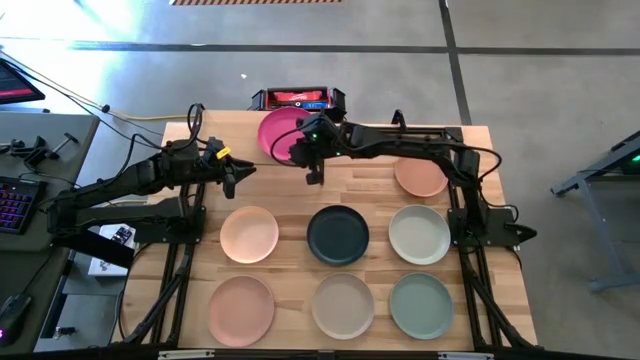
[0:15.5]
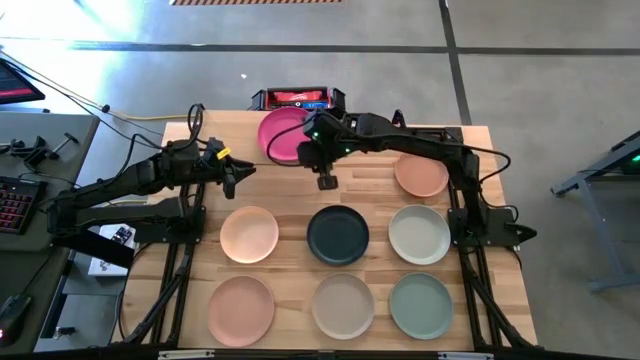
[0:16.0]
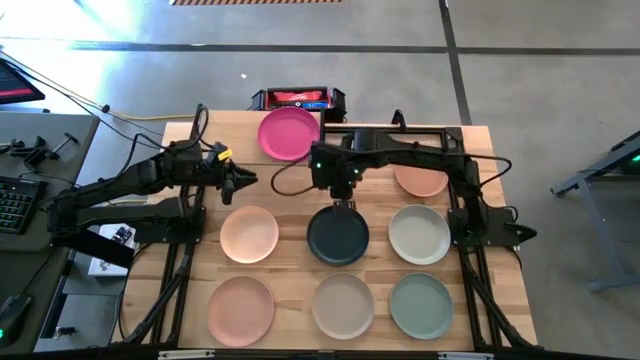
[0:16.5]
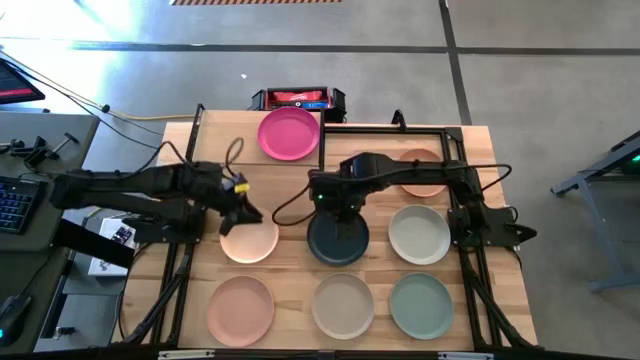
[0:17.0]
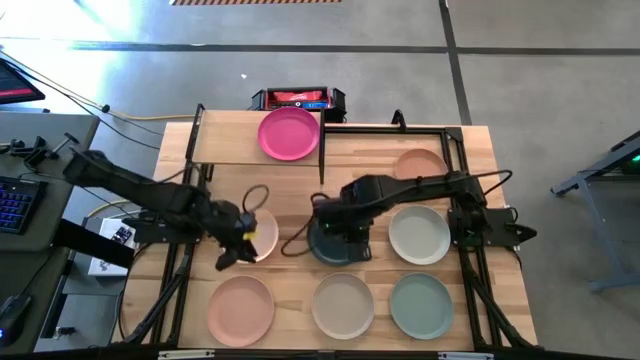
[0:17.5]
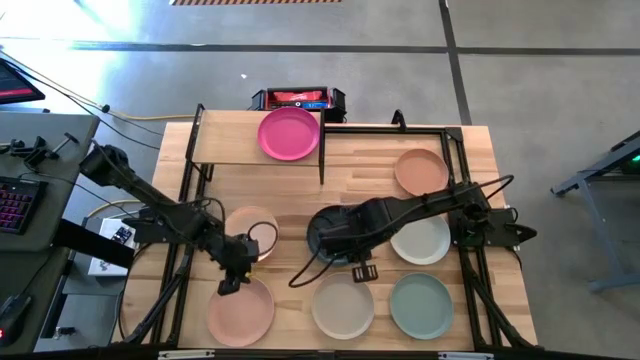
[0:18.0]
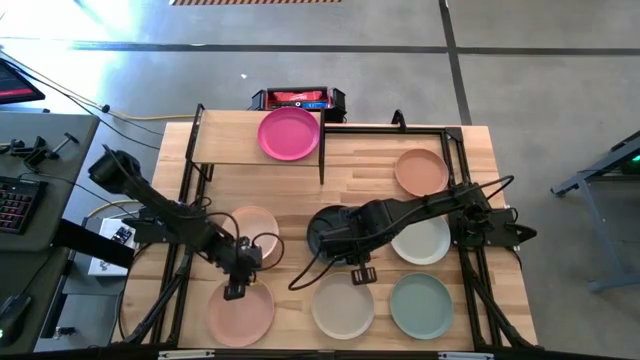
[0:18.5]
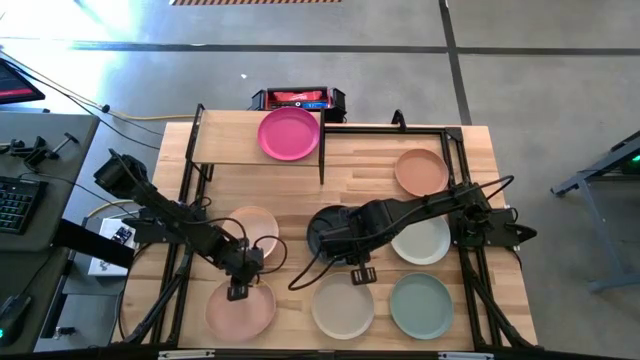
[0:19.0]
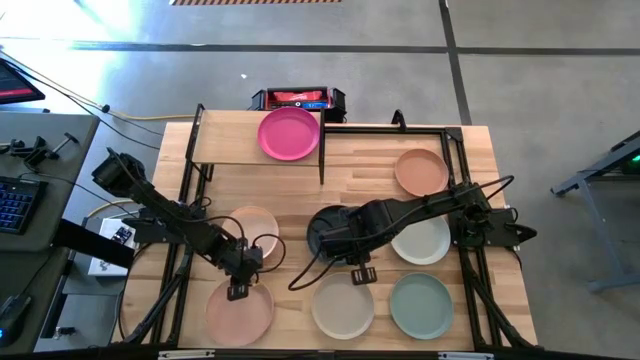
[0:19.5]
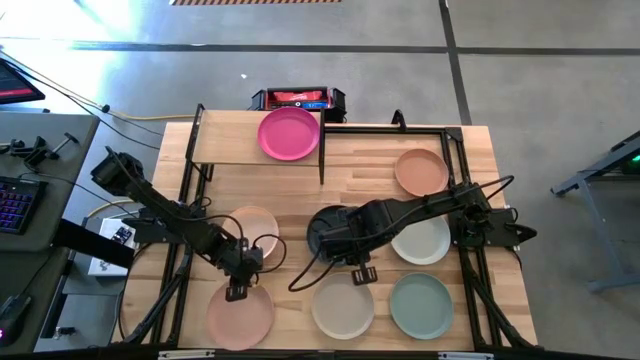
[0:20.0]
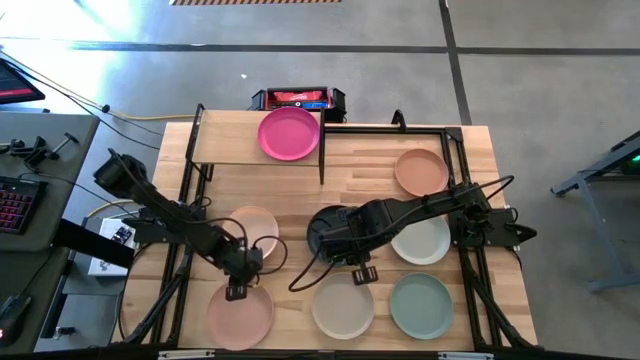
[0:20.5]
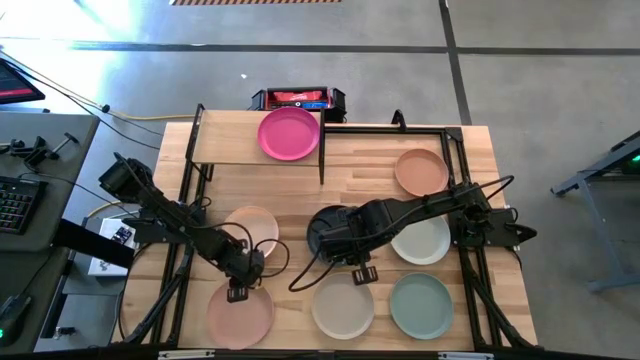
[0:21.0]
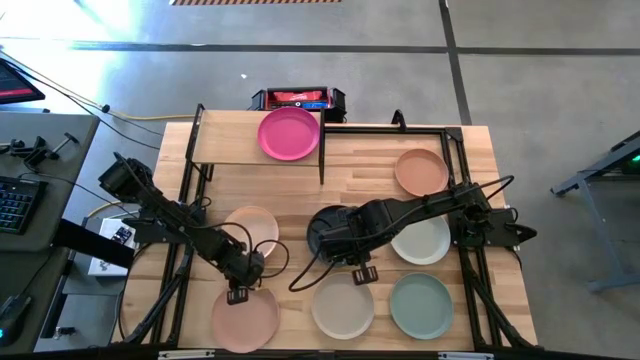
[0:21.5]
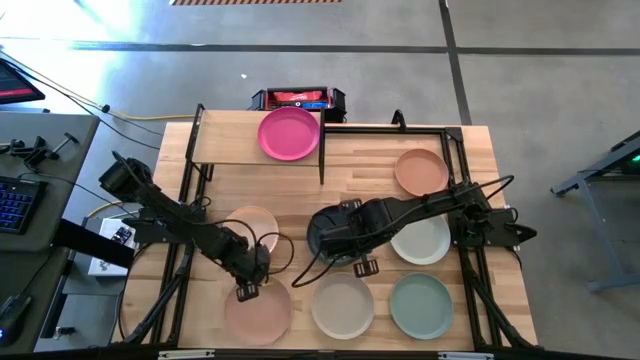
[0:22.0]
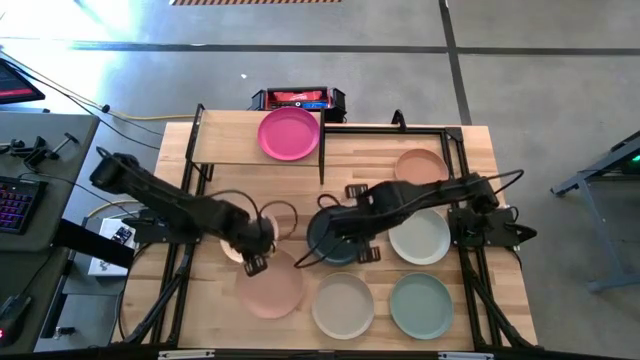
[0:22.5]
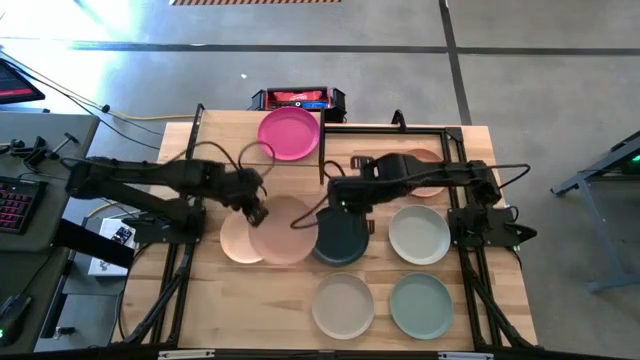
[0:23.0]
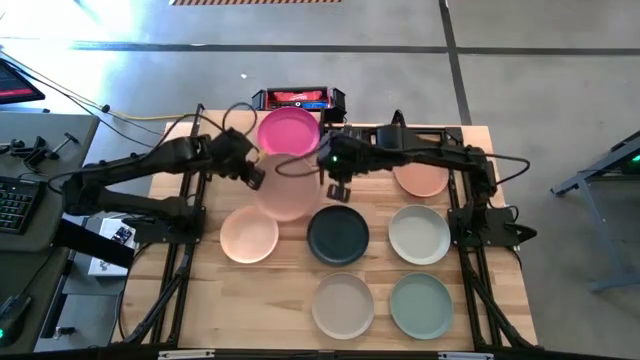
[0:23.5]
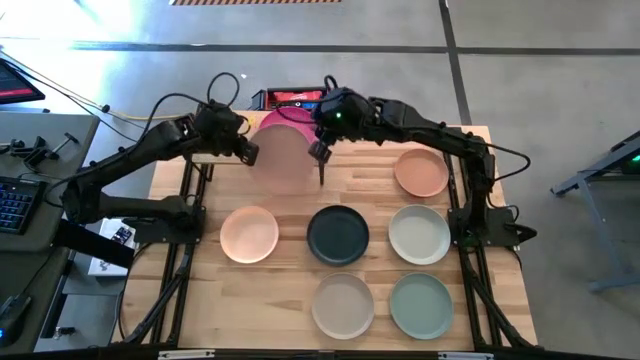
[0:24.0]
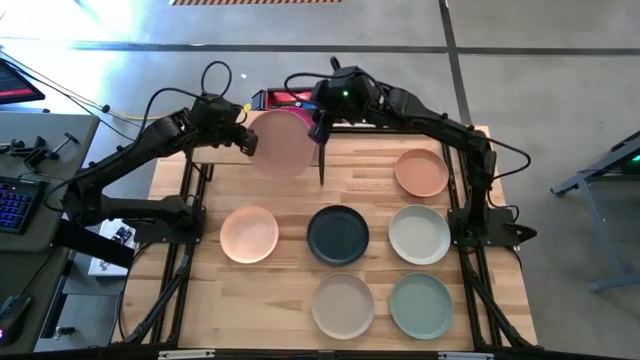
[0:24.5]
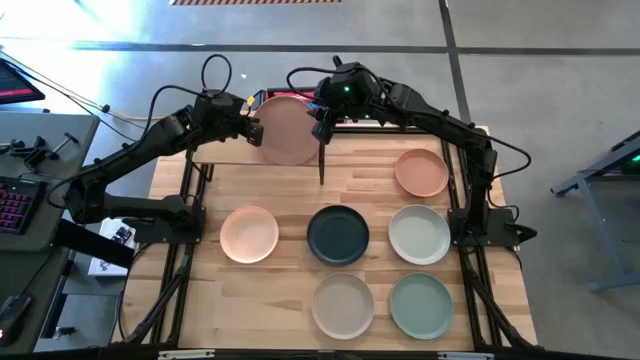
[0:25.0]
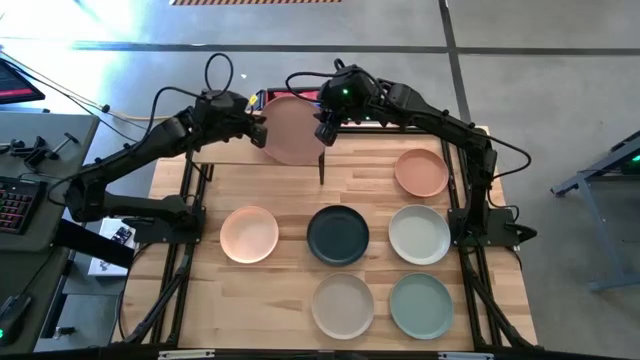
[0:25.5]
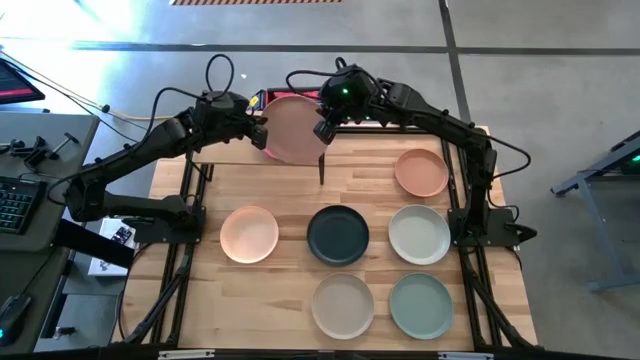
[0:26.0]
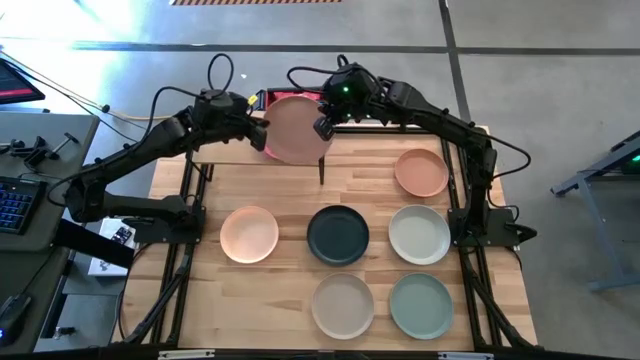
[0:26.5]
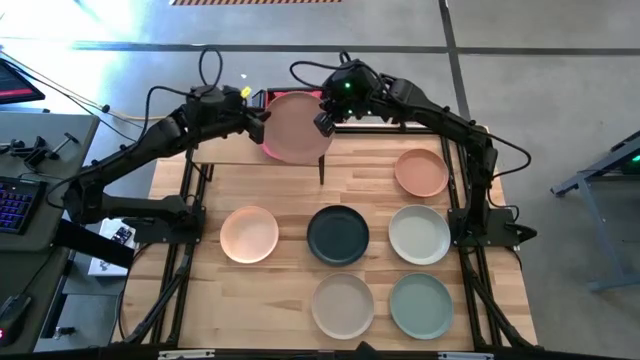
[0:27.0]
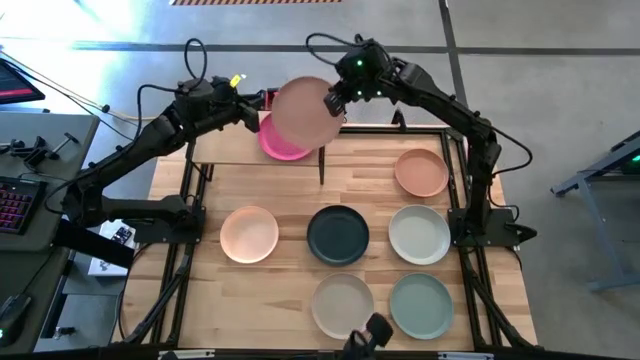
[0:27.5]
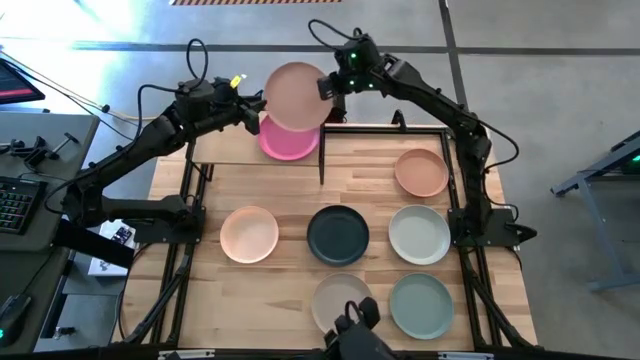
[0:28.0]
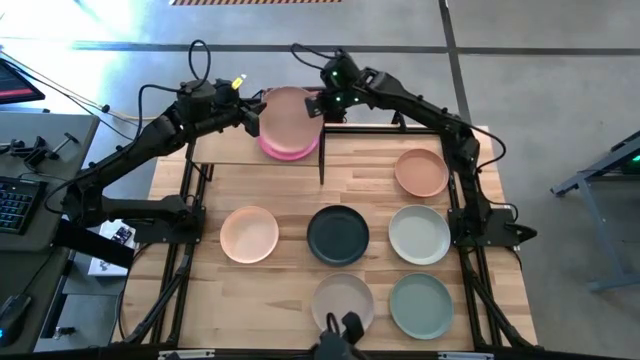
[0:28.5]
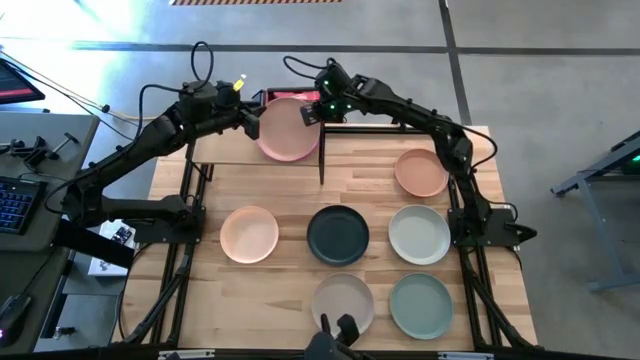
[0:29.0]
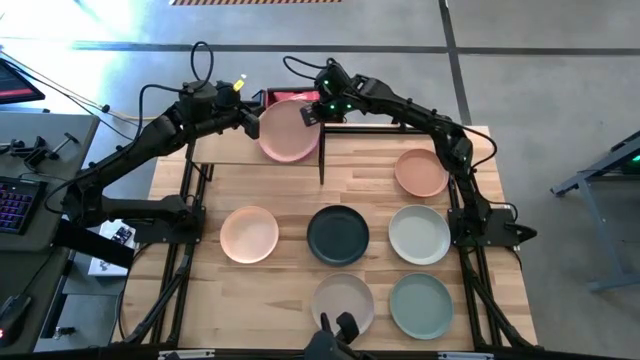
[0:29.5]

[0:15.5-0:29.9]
Task: Place and stack plates onto a shelf
Stack the brown plate on top of the pink plate on the shelf

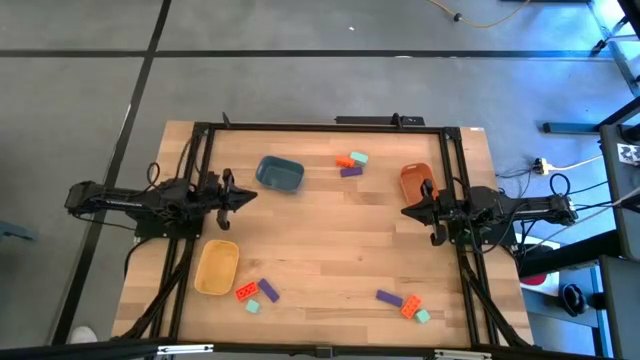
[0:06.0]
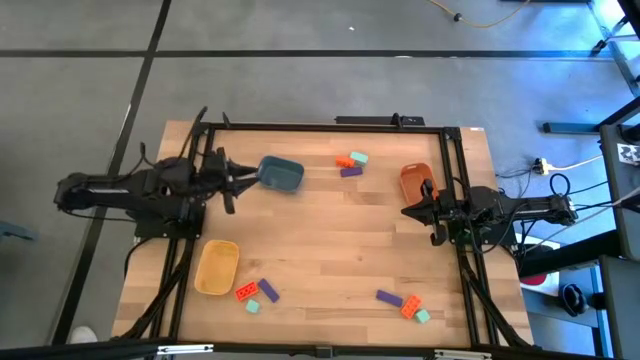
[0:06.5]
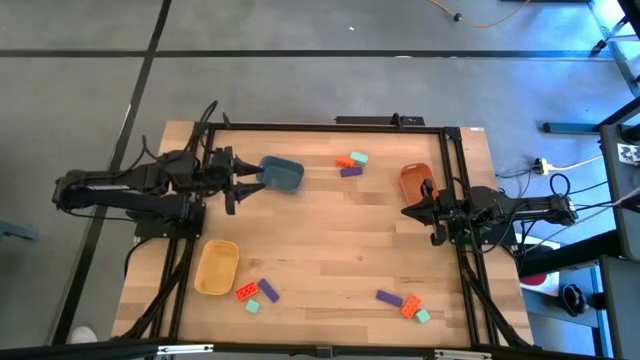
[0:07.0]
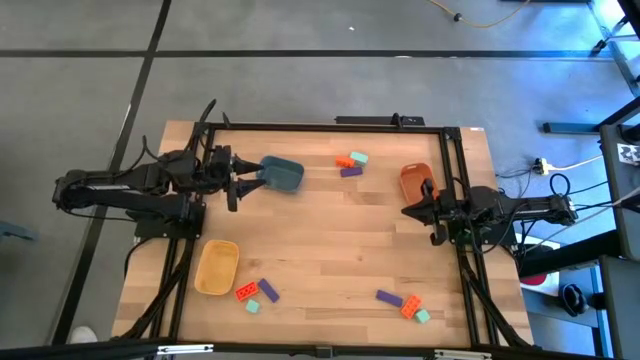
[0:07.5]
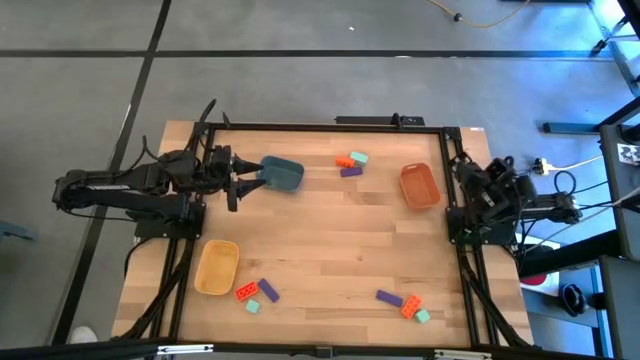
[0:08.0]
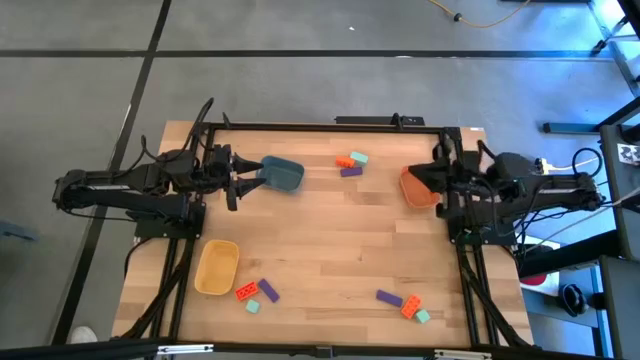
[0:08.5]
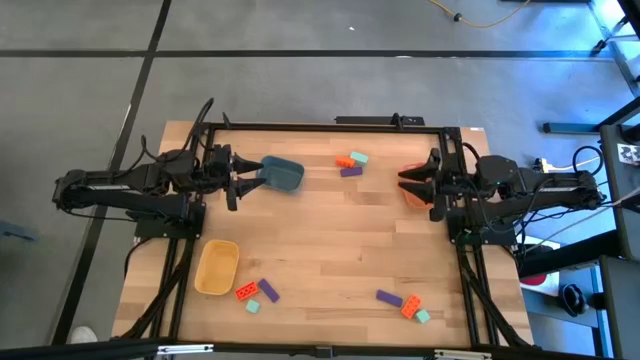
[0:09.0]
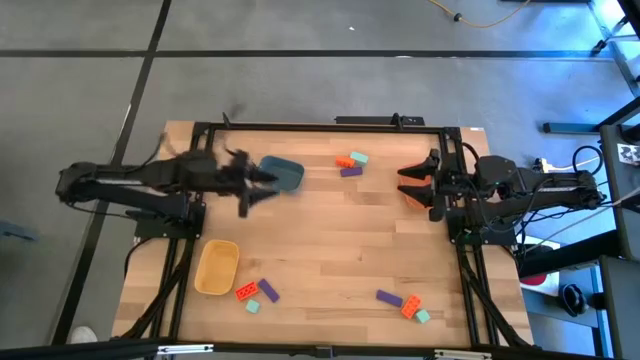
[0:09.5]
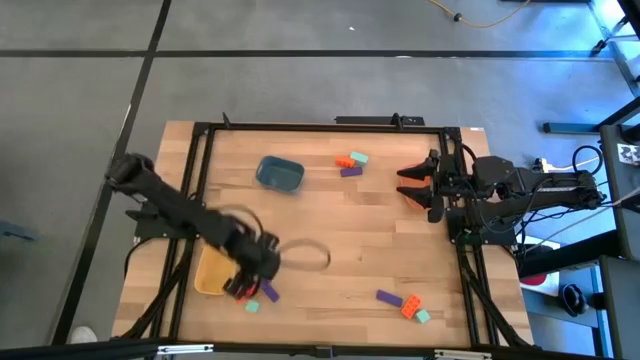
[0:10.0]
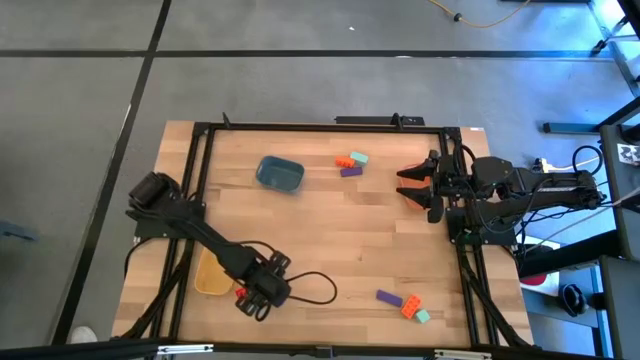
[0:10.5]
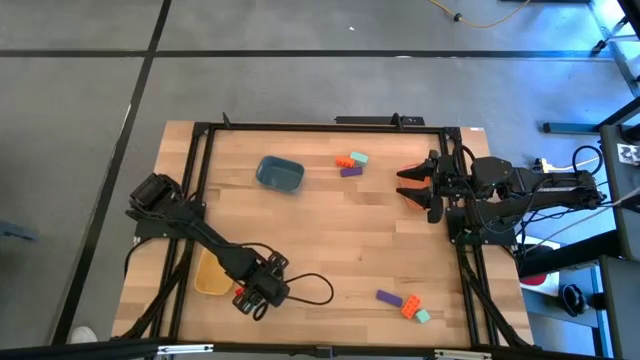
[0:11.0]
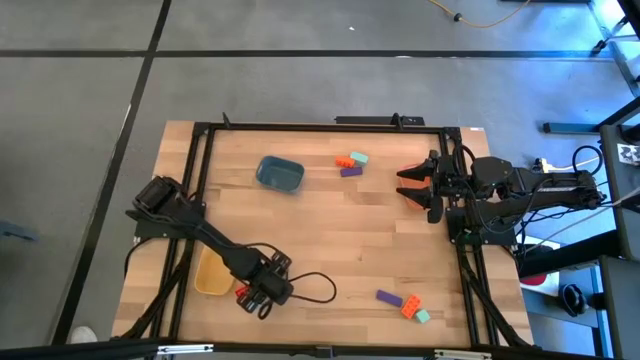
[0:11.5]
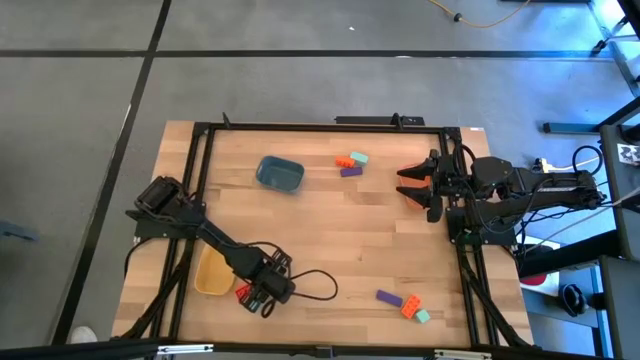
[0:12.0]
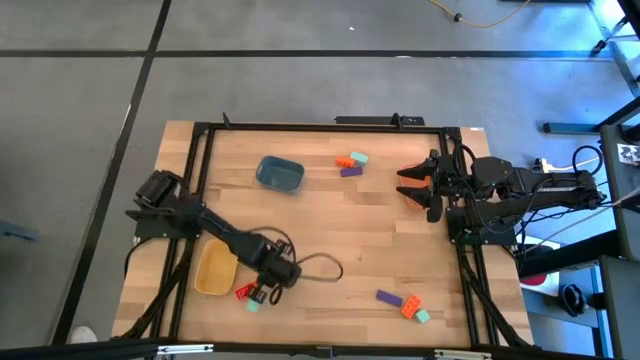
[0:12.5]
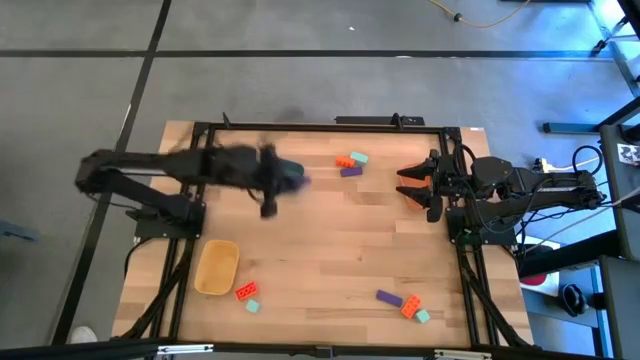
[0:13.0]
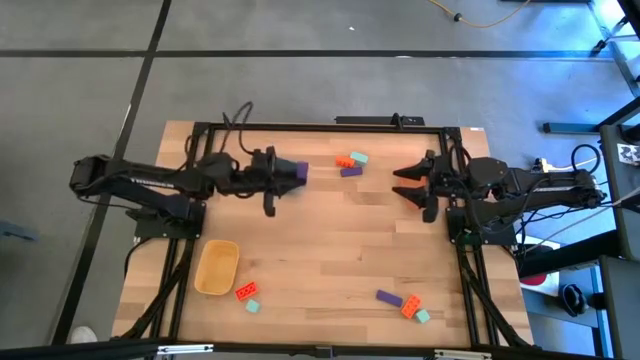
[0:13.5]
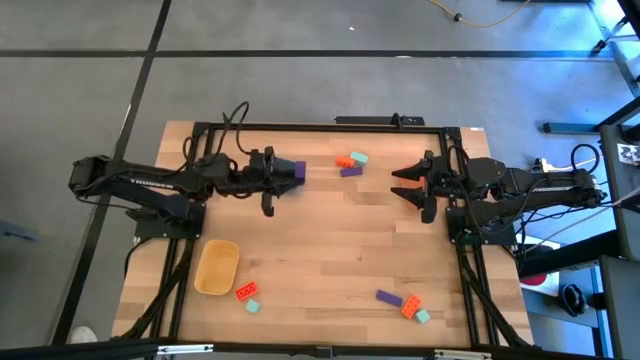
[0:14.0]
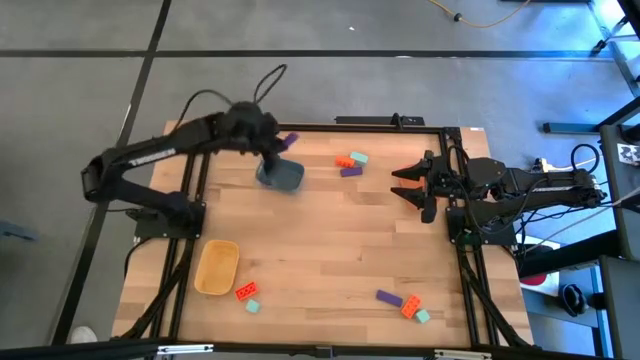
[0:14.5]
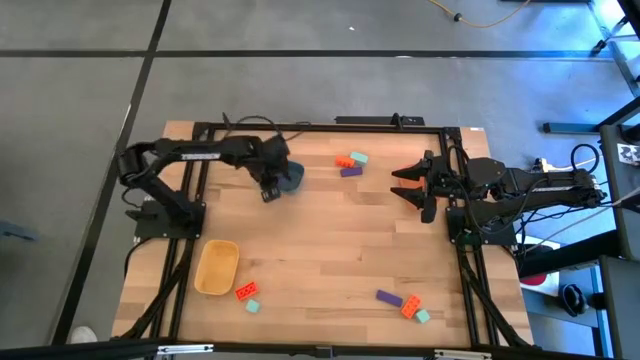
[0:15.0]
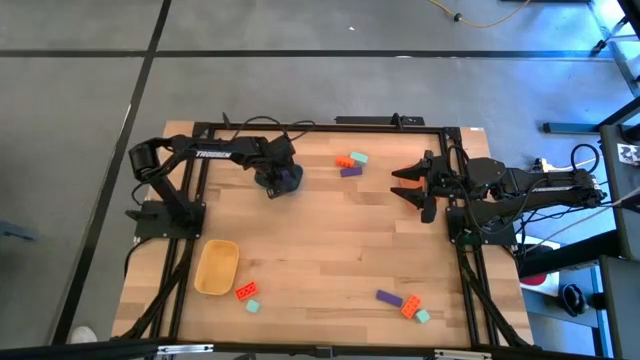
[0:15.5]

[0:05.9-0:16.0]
Task: Sort & place blocks by color
Put the bottom left violet rectangle block into the blue bin
